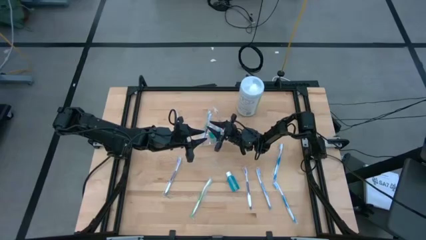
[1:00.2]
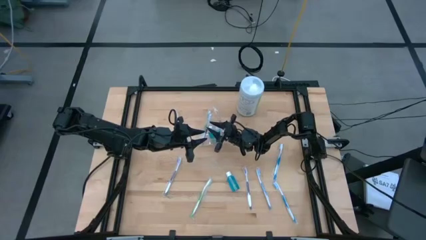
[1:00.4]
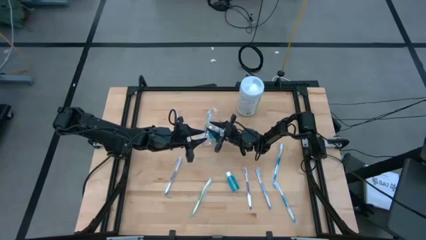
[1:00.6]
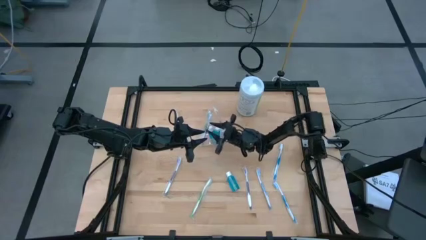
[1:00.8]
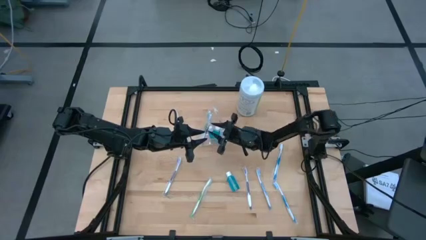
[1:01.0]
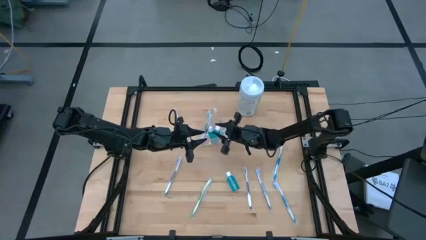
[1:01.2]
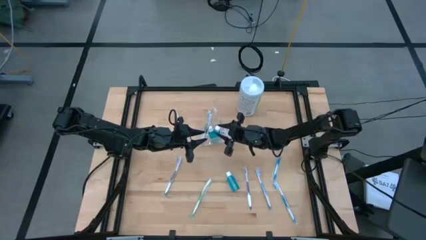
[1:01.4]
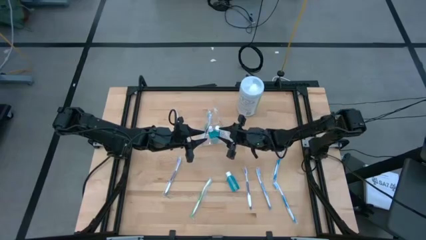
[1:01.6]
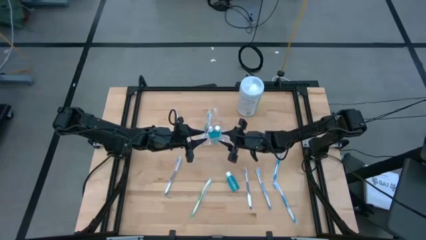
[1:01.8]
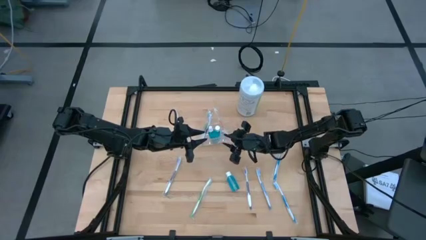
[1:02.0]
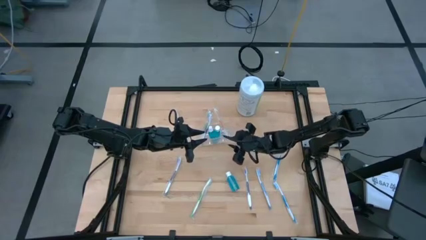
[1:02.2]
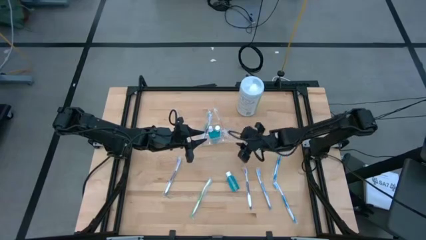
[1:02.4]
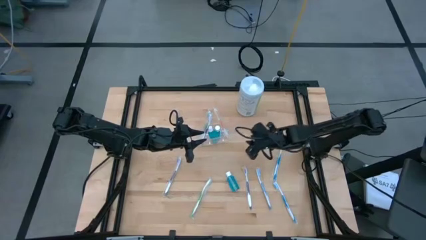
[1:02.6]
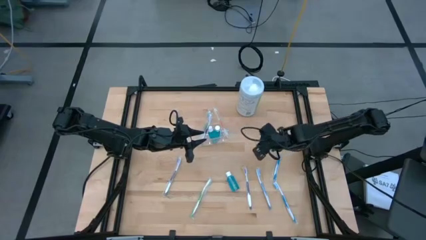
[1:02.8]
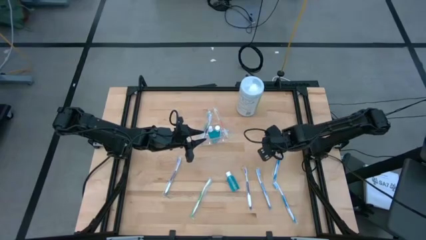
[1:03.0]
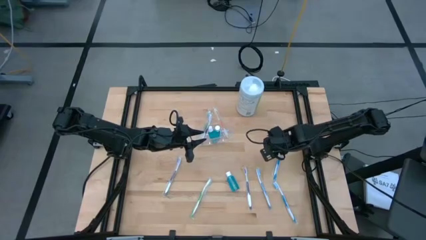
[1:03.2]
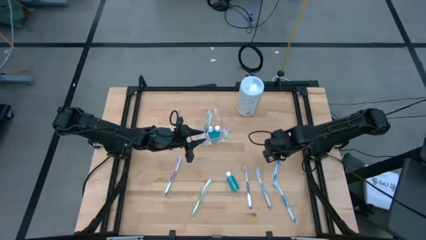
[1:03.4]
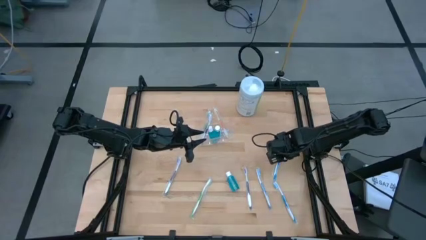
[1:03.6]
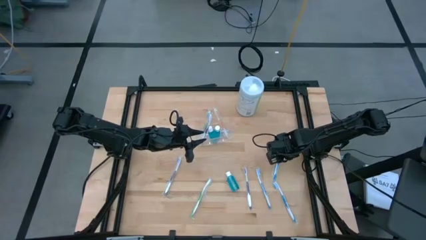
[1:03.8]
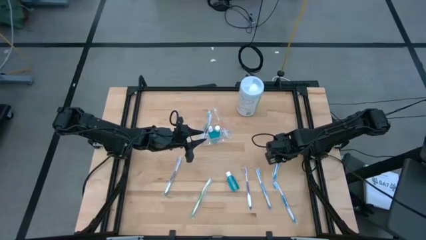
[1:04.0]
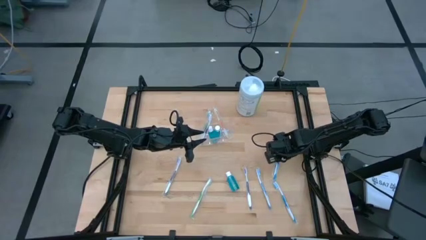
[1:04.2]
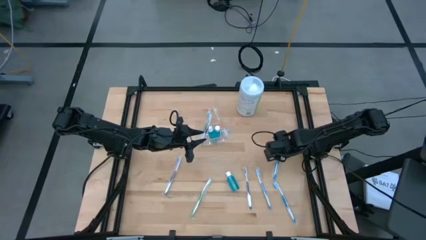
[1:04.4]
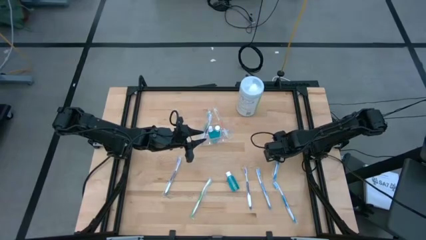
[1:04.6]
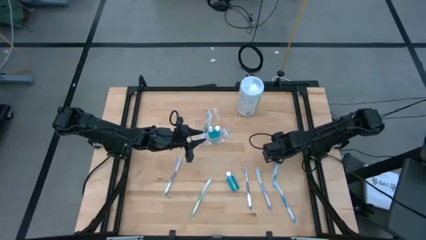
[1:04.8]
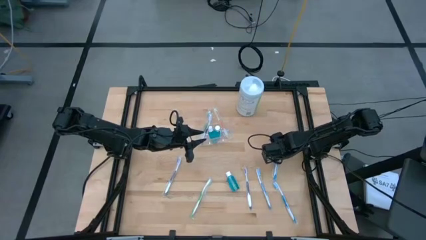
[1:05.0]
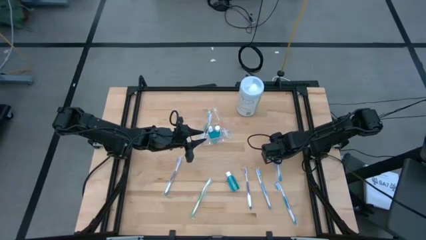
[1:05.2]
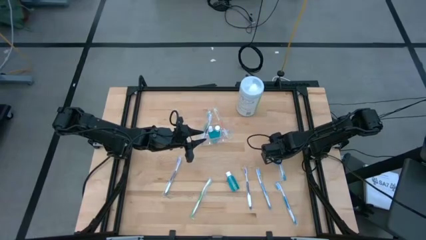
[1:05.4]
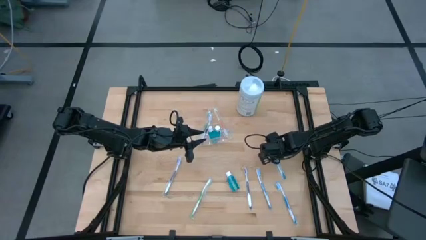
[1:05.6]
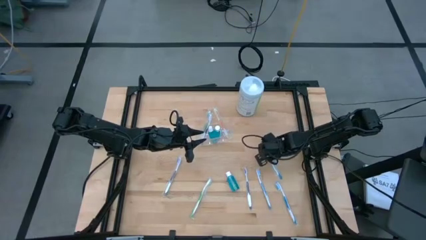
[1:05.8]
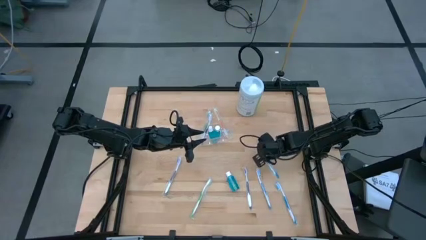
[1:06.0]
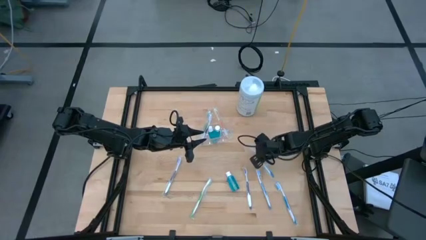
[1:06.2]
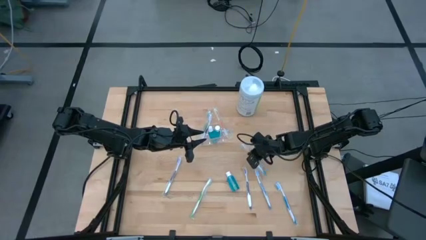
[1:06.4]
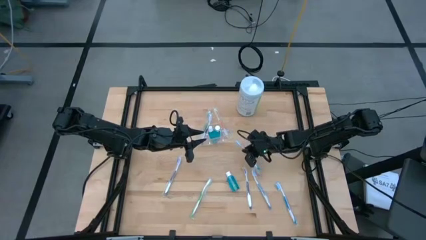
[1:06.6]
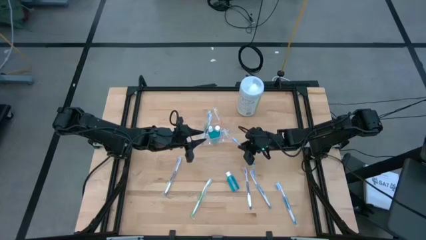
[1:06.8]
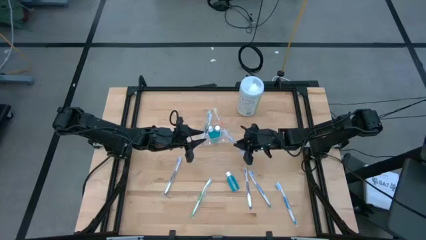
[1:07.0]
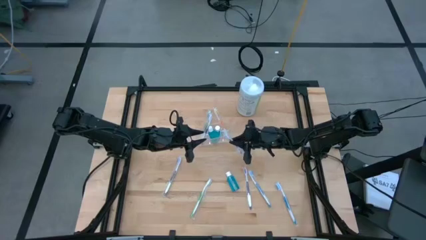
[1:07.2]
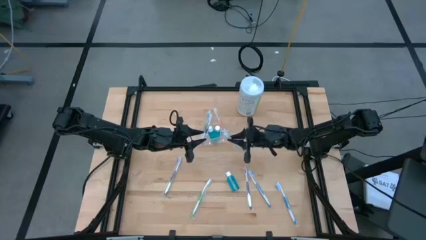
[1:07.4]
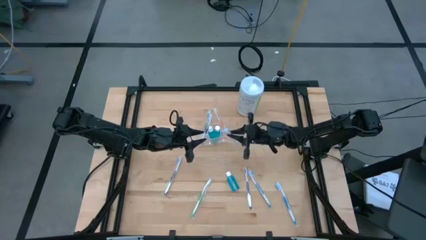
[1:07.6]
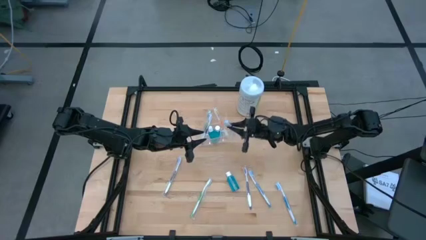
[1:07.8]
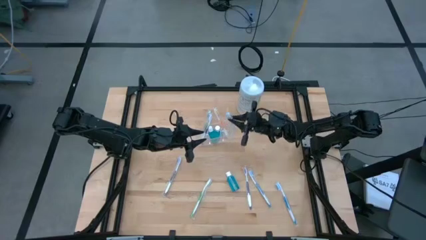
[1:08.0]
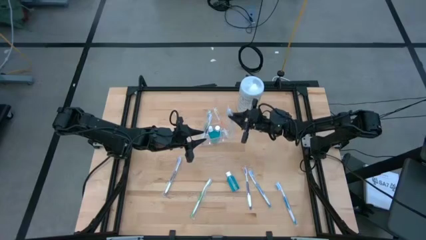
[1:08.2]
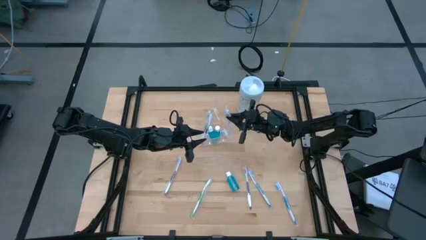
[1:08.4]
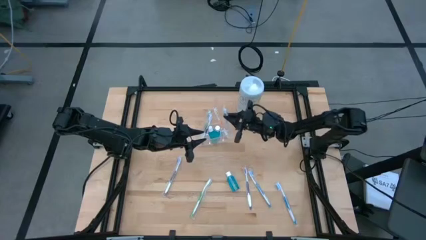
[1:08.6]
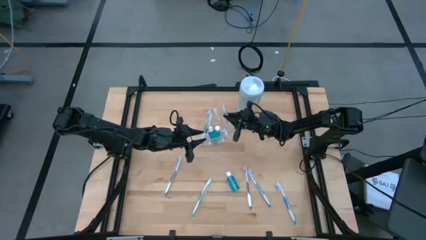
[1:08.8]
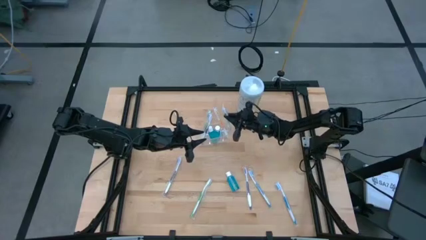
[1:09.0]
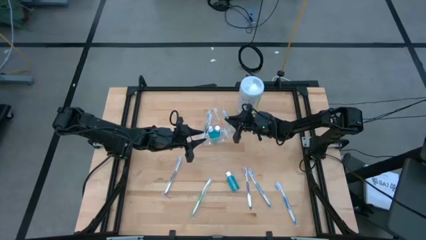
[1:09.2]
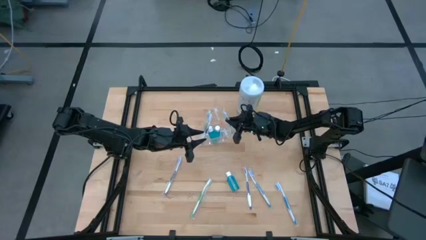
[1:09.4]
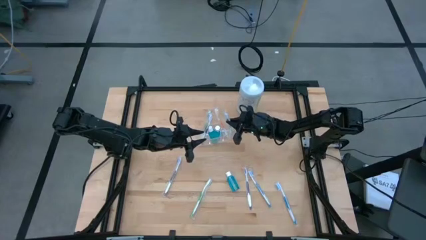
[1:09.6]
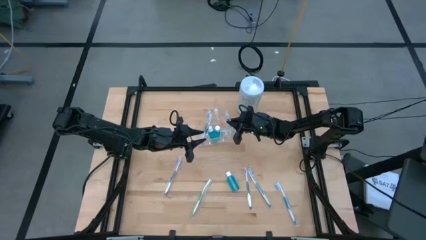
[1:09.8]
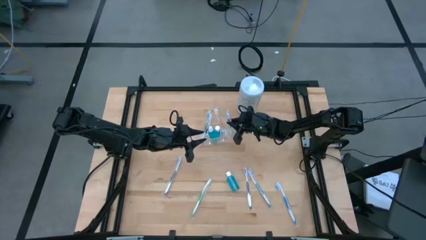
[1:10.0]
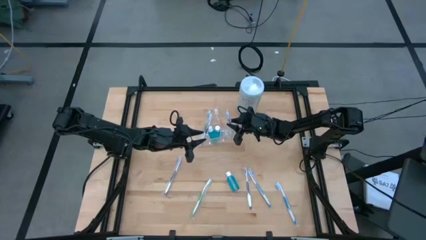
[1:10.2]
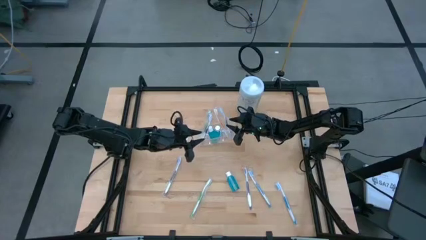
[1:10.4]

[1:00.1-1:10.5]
Task: Pick & Place toothbrushing station
Put the top blue toothbrush into the transparent organizer

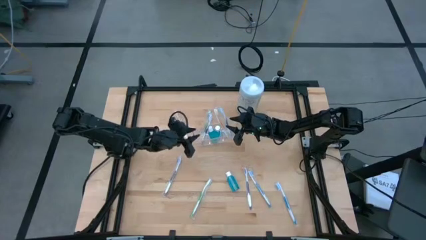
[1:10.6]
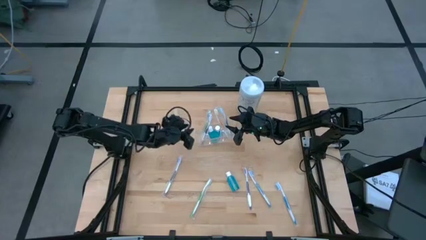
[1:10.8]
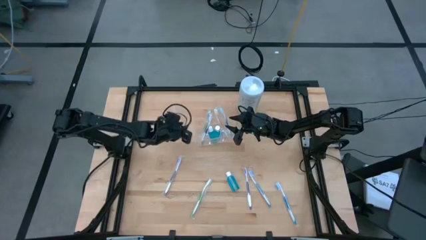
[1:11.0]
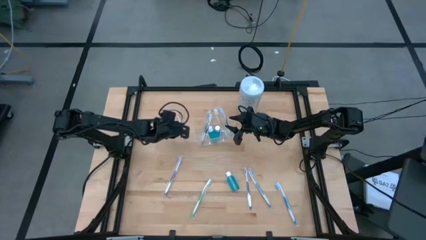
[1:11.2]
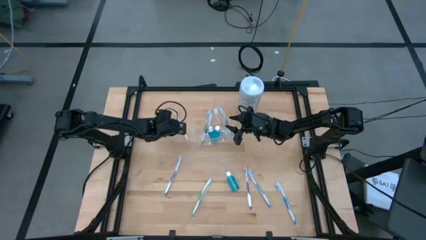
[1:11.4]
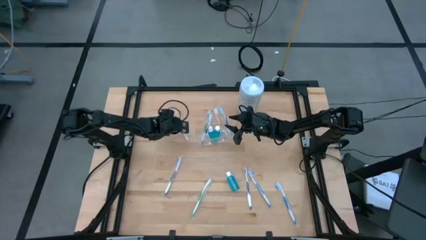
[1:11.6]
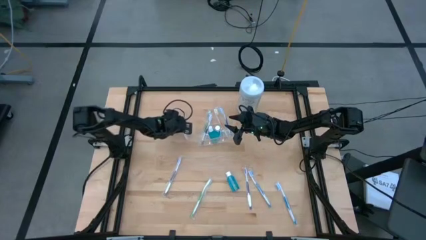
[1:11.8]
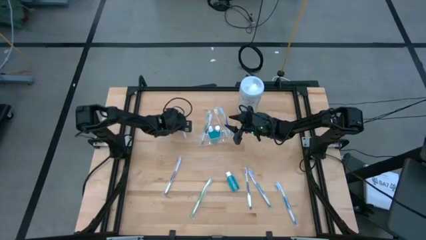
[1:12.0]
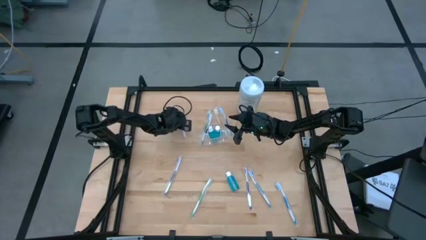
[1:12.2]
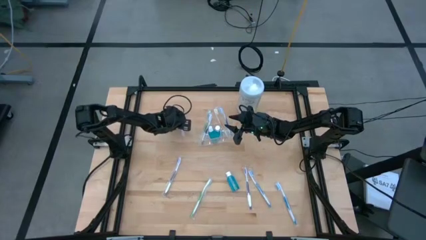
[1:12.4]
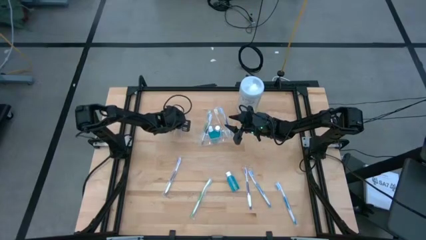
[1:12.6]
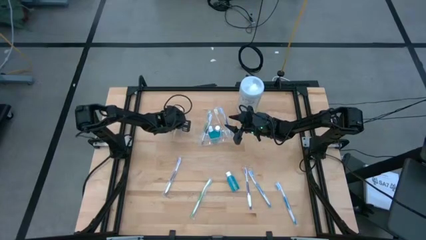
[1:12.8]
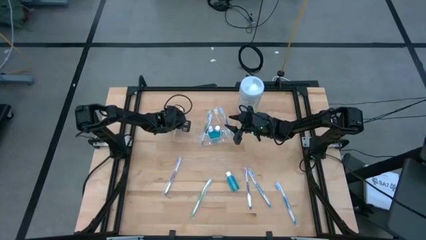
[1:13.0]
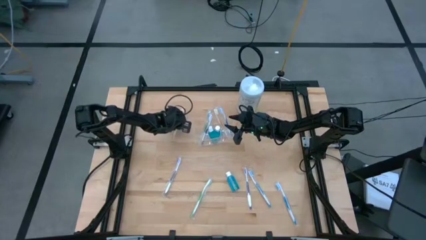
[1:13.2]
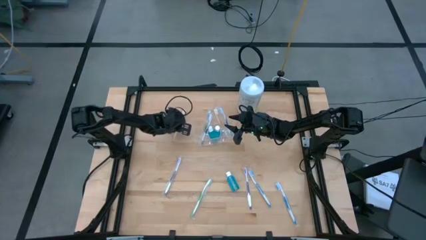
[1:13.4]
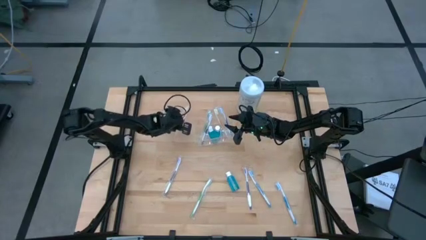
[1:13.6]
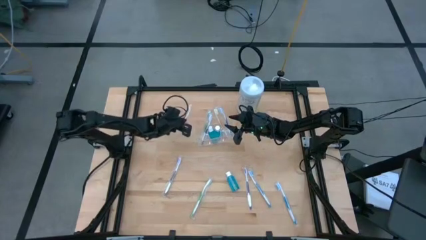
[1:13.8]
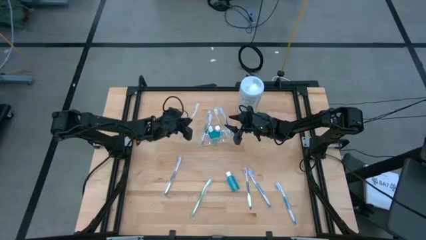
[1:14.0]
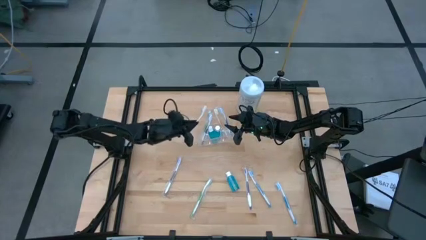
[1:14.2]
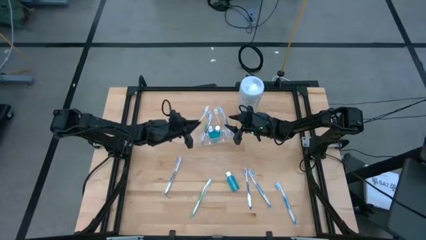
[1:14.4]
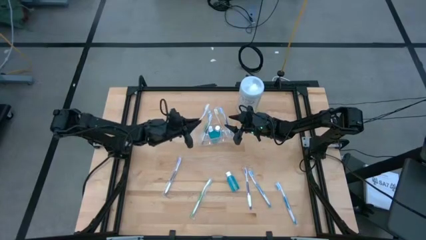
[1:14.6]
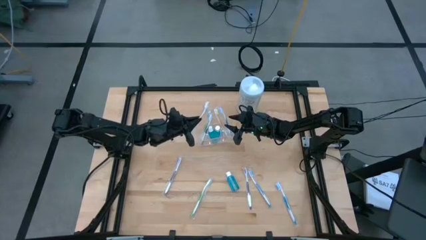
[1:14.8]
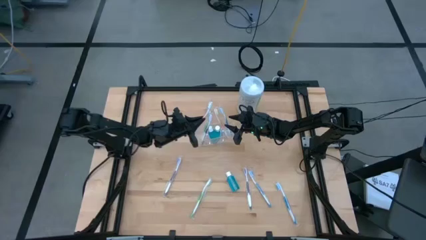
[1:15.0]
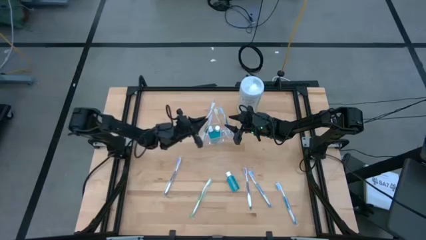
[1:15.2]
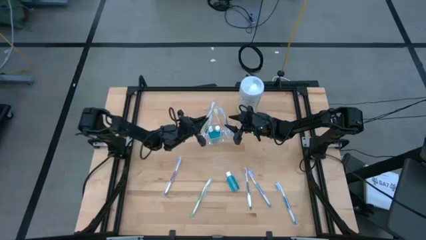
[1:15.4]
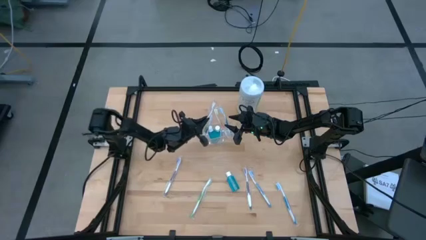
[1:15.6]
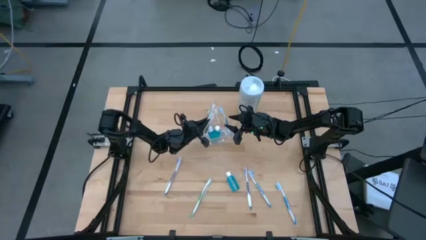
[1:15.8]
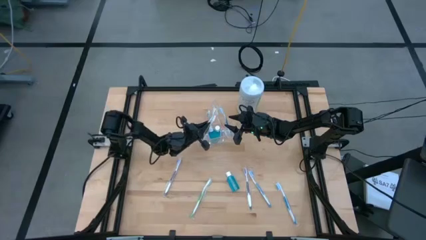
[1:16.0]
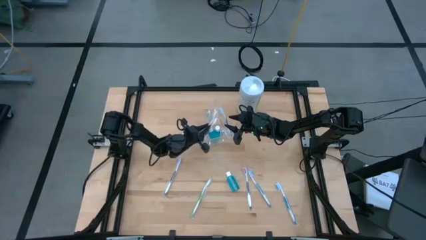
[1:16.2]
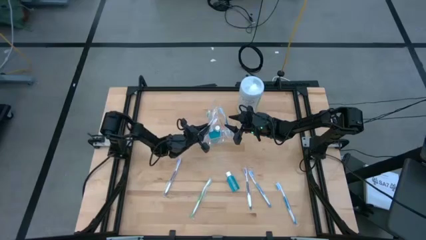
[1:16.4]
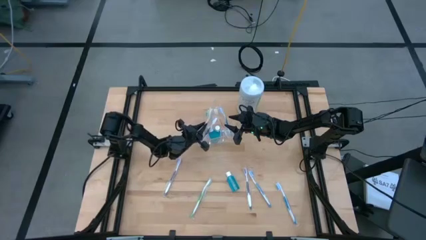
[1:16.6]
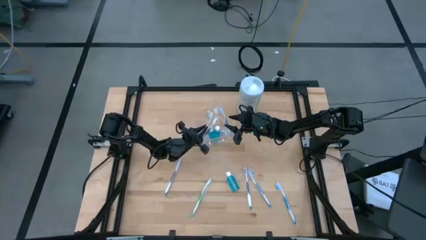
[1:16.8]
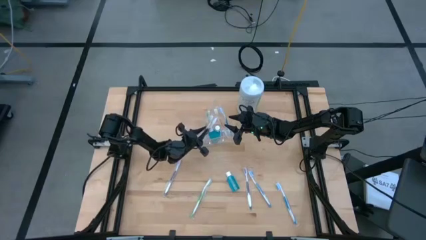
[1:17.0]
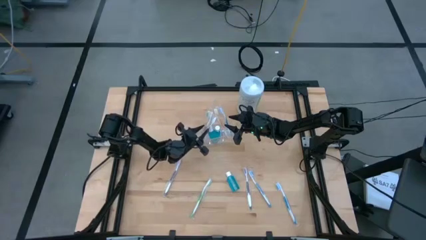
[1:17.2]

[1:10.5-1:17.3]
Put the orange toothbrush into the transparent organizer
